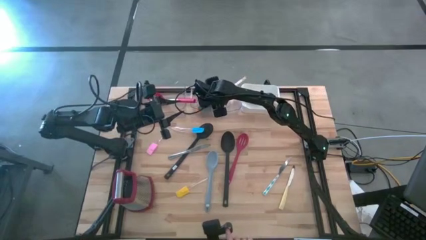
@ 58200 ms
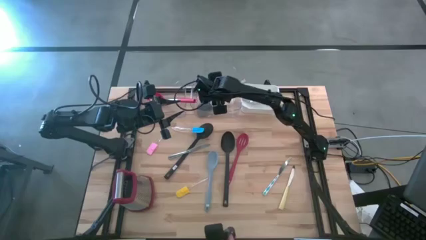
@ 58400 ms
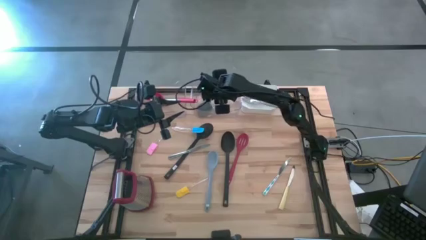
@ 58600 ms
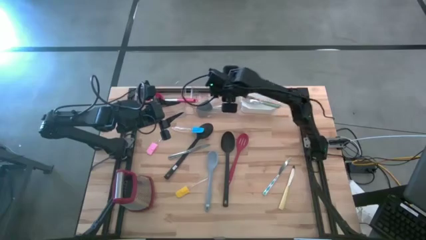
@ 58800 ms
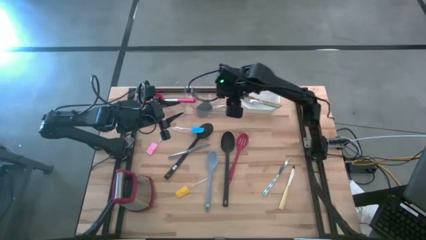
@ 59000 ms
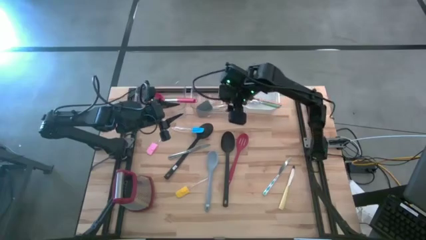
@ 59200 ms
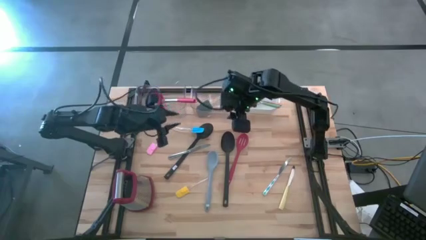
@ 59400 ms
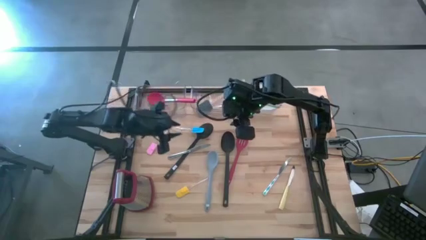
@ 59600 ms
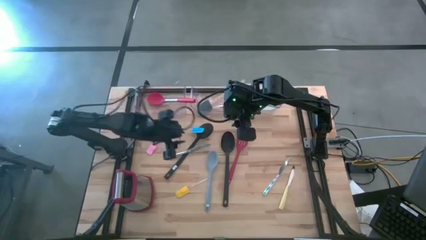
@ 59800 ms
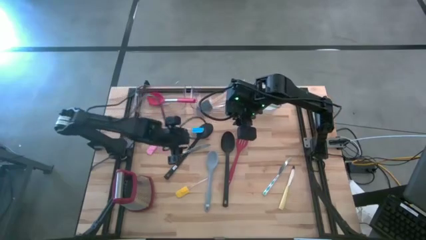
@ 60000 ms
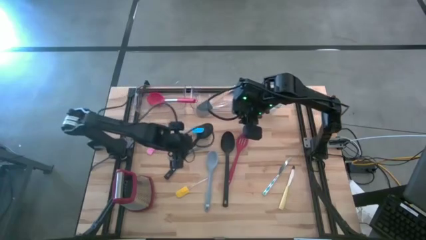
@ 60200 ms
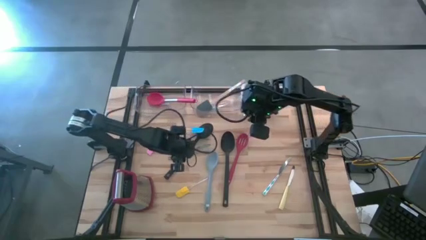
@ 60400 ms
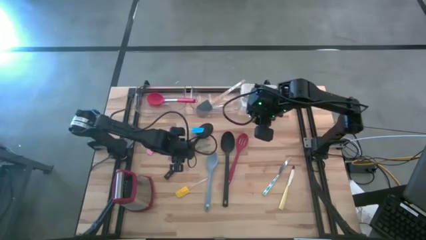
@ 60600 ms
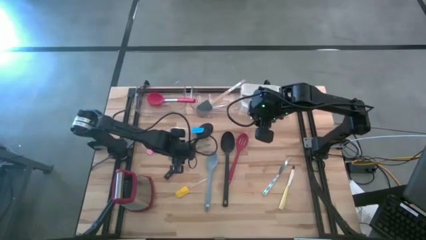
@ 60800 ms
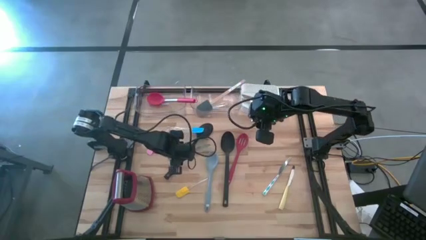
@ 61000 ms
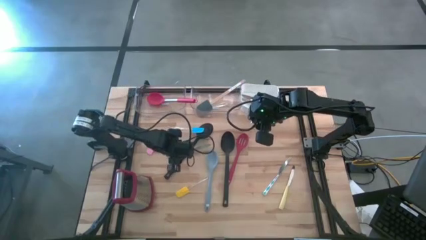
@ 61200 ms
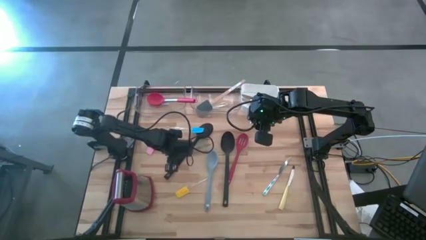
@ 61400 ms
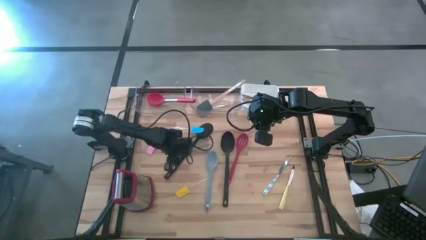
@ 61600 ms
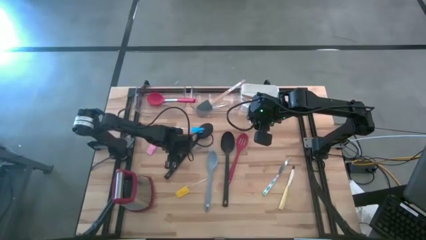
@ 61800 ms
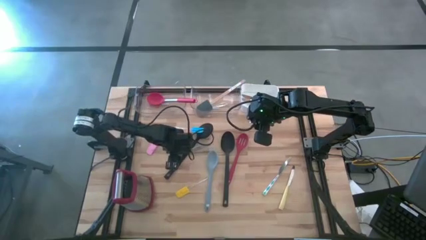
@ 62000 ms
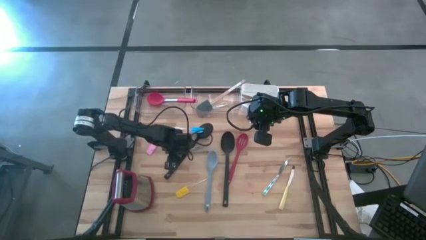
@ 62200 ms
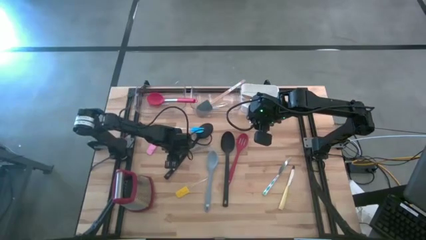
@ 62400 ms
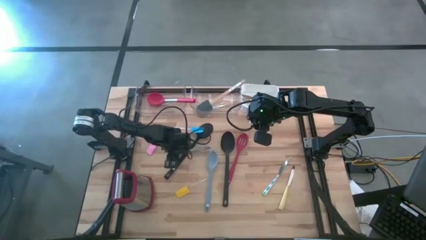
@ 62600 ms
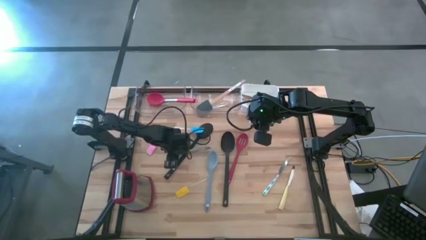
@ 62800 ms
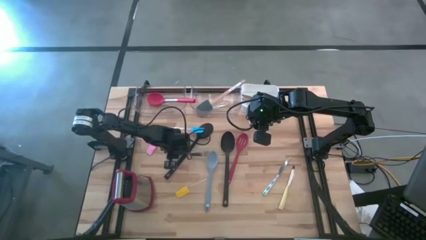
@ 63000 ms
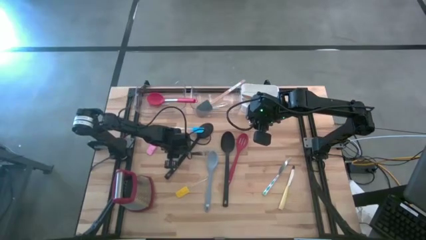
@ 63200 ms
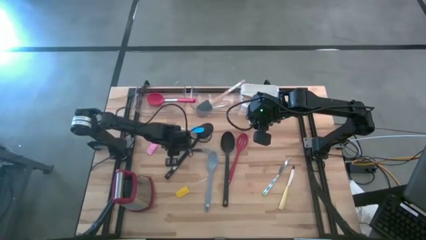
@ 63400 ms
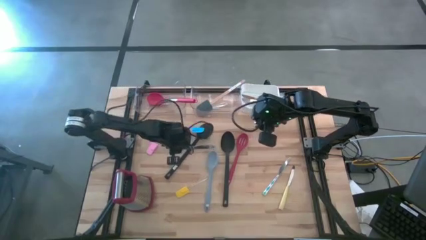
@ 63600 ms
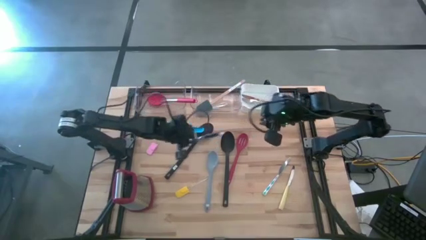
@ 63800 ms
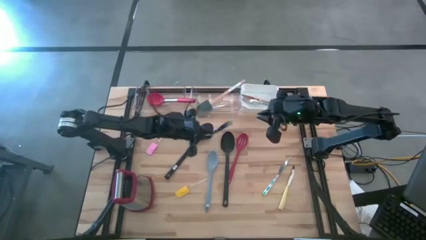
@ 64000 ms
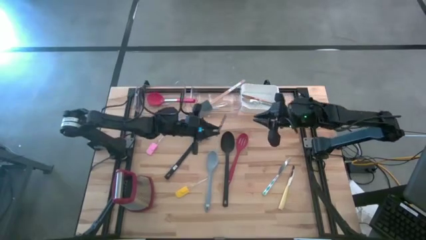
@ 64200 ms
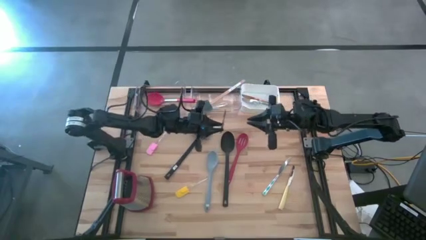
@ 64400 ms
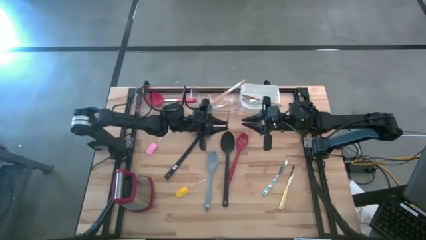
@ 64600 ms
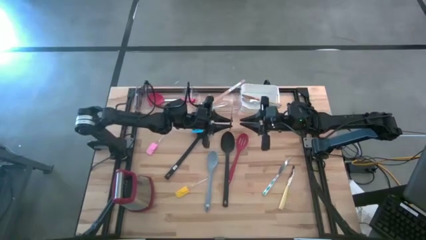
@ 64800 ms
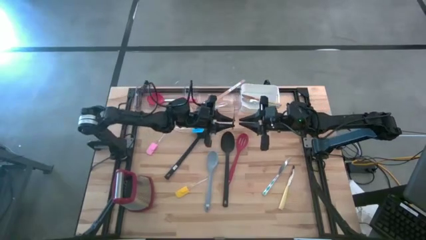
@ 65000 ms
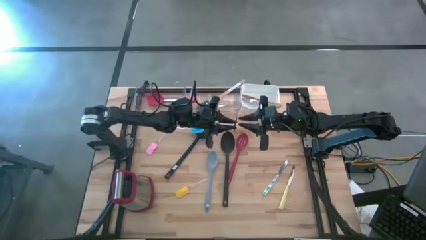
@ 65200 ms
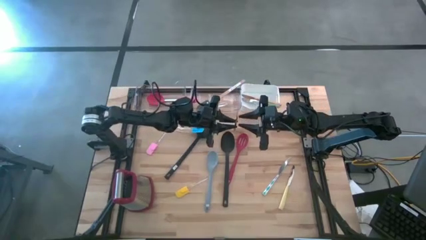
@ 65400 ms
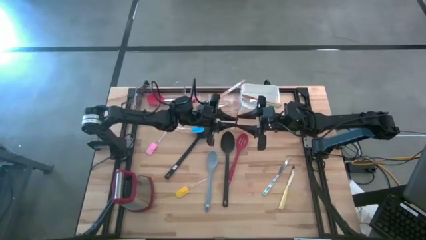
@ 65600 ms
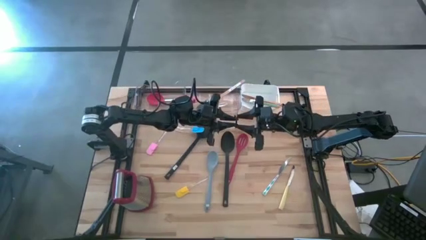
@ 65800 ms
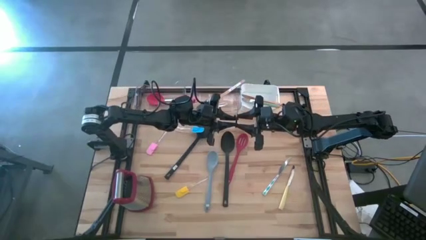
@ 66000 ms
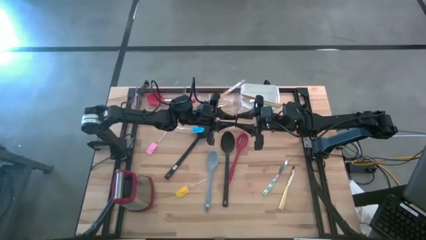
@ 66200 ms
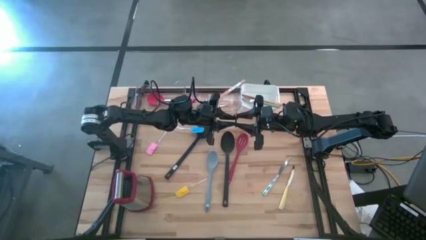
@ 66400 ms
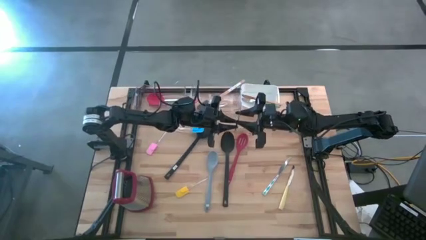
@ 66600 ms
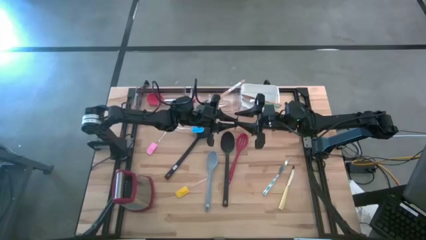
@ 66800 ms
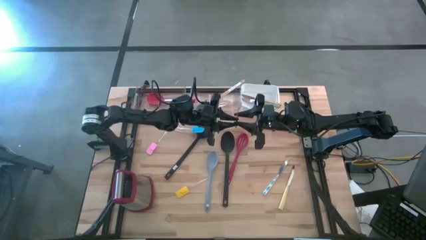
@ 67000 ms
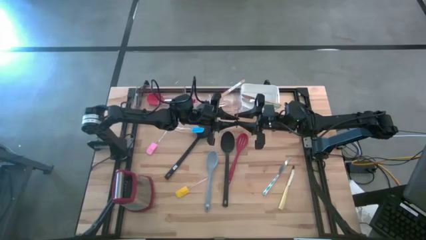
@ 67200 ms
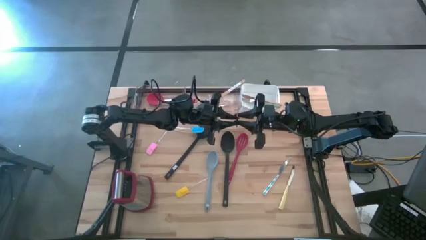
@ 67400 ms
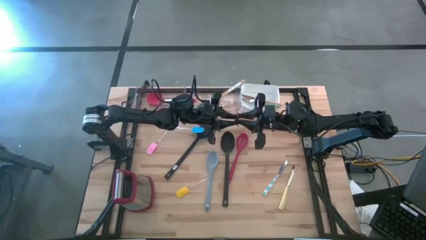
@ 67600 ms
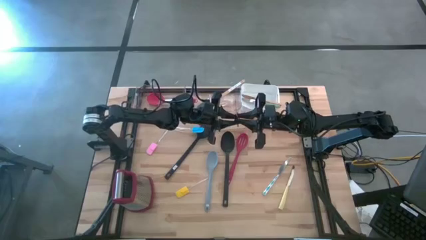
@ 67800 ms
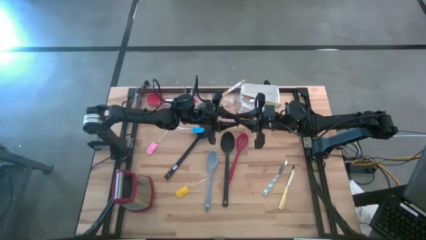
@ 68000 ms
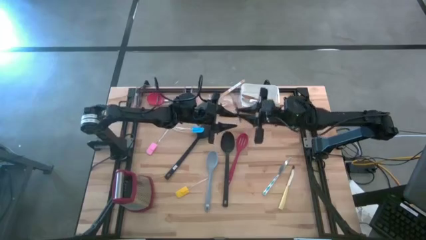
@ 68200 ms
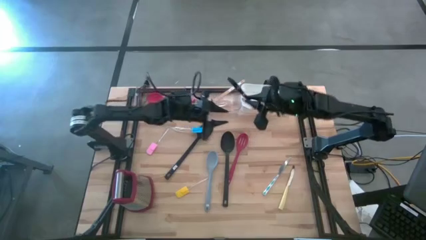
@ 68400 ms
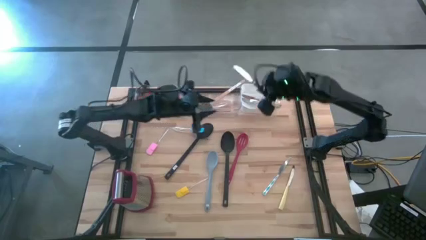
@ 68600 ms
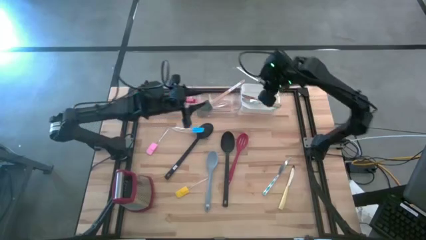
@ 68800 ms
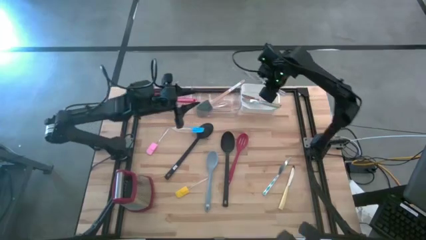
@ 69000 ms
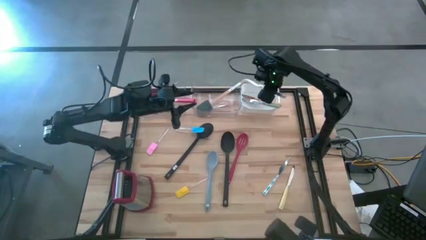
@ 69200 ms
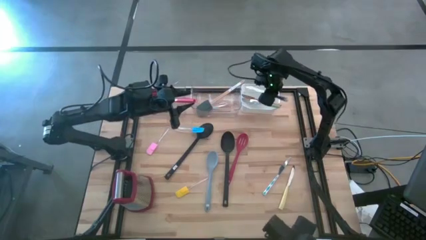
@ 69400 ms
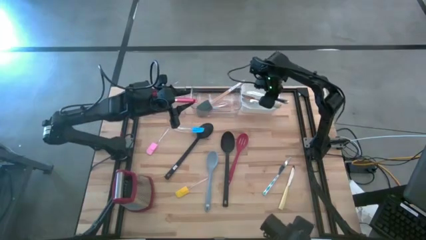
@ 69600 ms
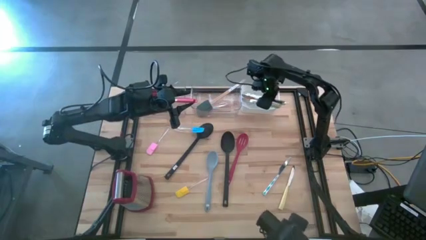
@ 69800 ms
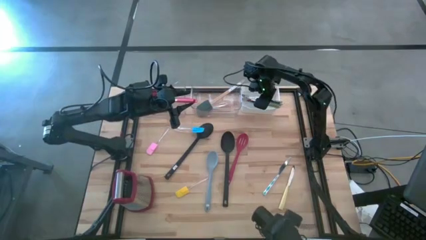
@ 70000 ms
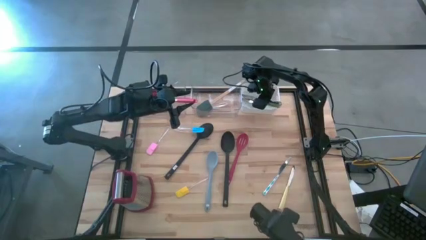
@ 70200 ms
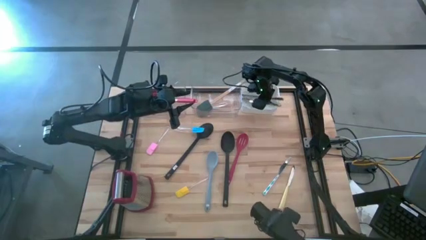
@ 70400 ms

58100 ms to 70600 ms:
Task: Pick & Place Kitchen Items
Put the silver table knife into the white bin

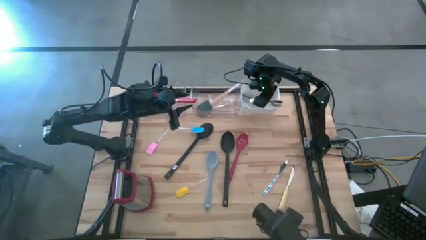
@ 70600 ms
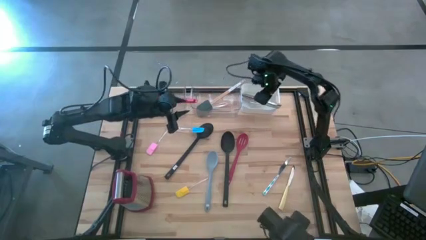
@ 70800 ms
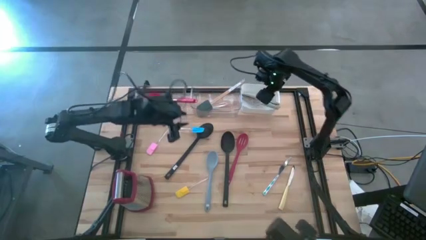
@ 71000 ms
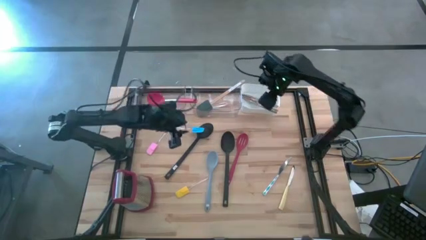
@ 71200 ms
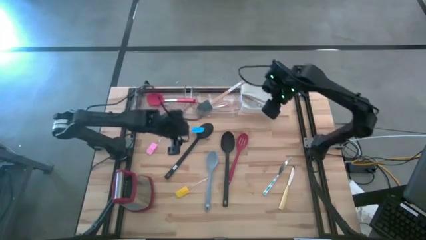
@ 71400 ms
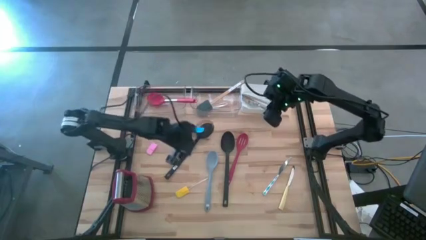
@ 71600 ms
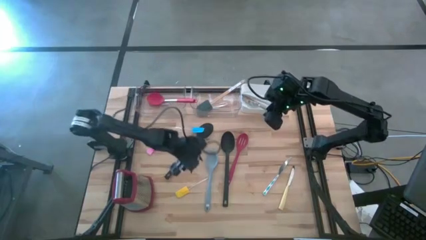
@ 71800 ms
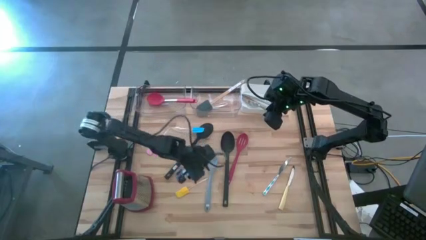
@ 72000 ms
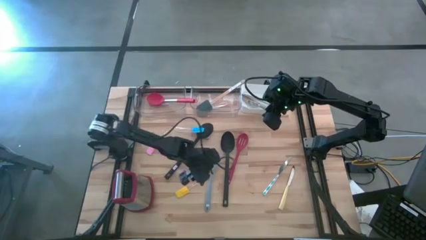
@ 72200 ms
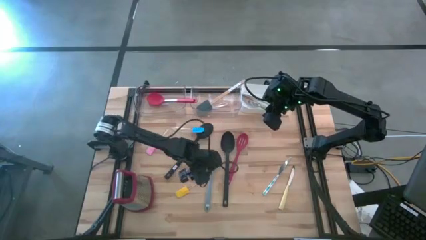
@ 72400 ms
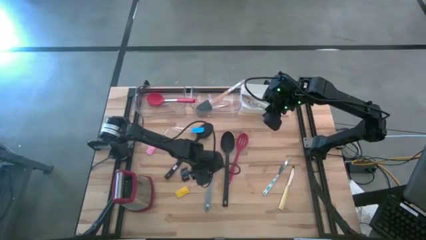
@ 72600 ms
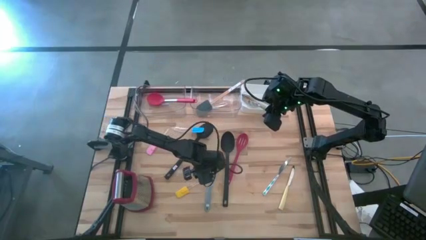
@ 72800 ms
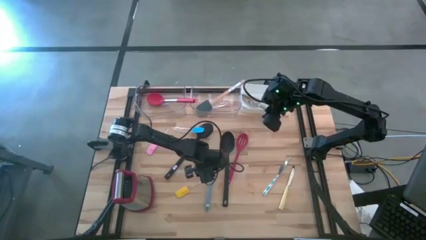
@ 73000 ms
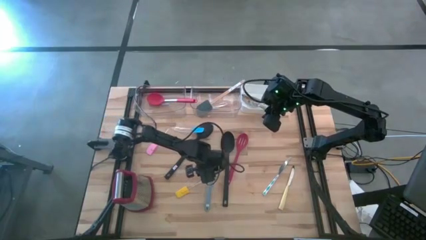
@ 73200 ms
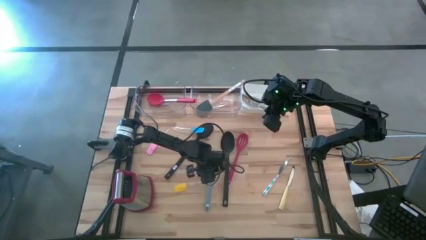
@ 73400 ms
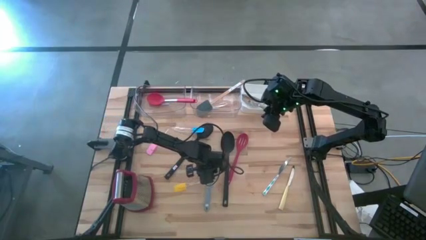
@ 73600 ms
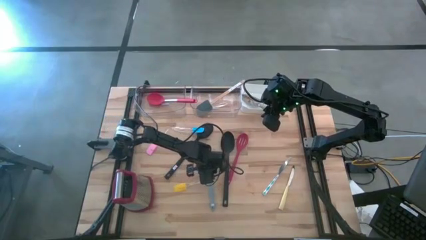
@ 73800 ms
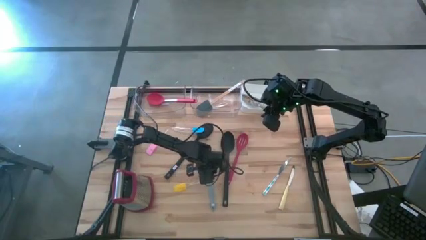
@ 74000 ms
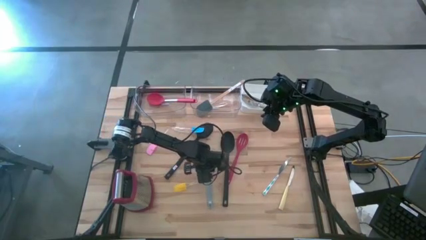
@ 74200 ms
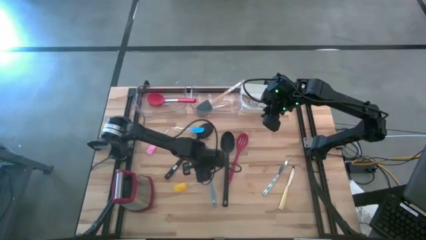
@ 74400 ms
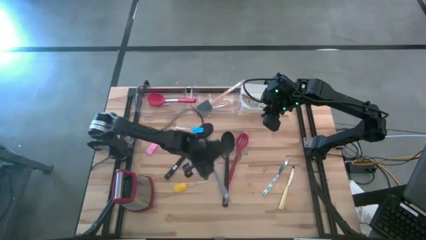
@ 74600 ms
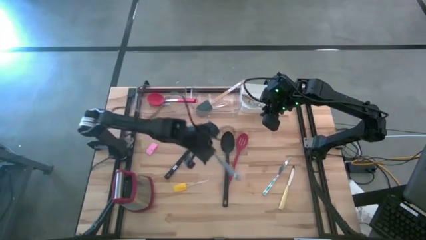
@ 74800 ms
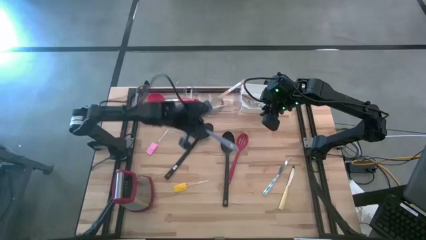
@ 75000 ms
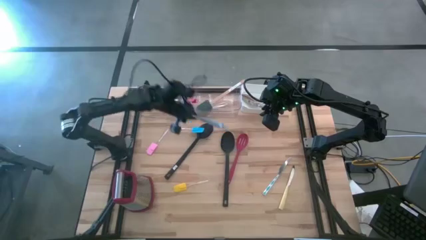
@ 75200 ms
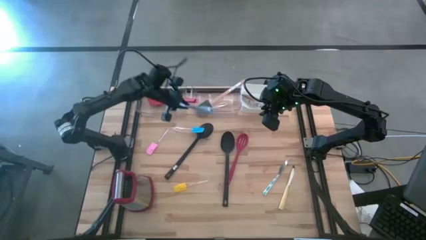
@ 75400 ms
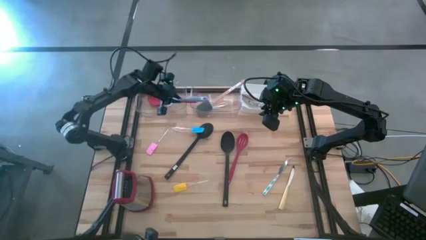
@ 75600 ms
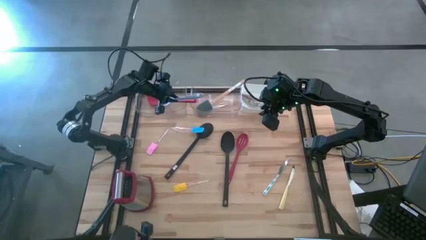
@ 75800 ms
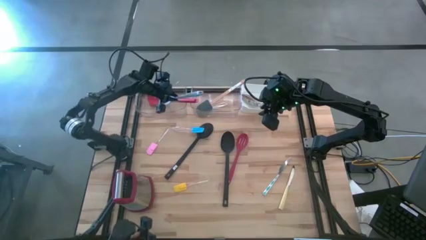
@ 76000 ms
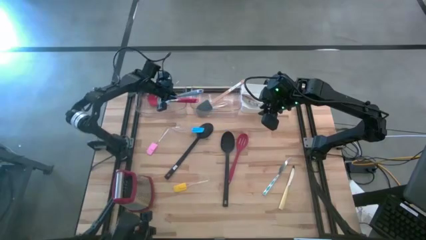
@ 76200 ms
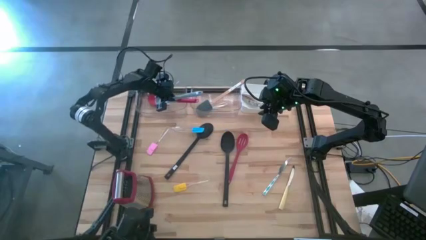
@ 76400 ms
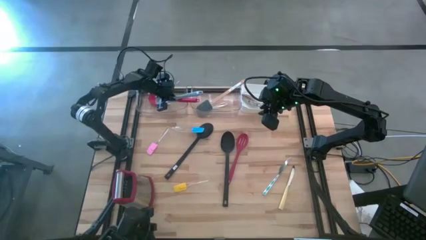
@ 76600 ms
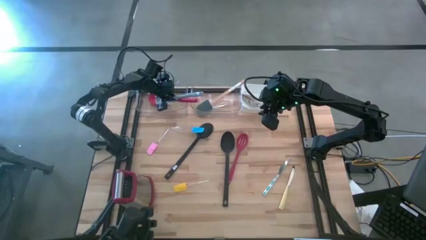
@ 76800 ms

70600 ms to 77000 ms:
Put the blue serving spoon into the left transparent bin
